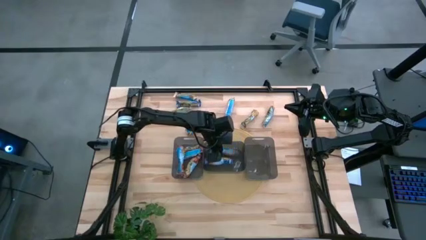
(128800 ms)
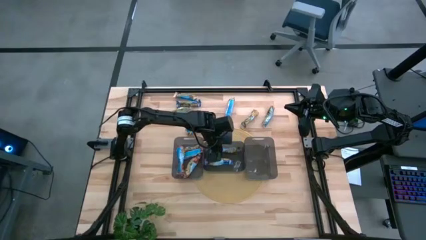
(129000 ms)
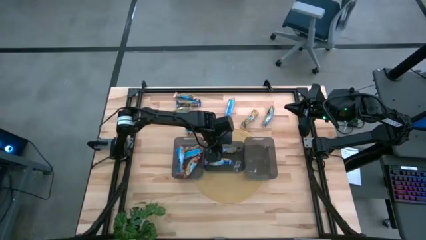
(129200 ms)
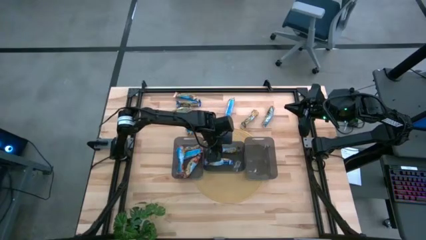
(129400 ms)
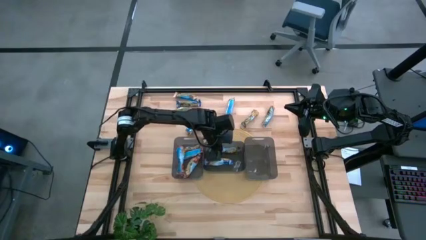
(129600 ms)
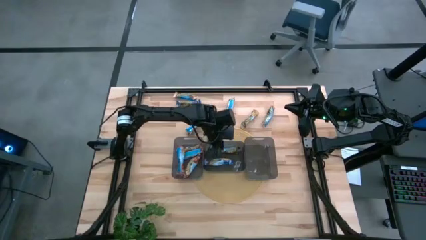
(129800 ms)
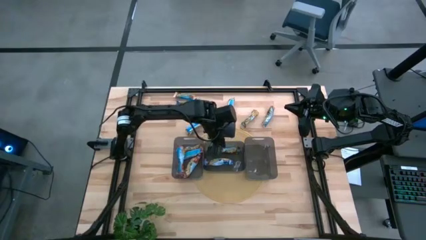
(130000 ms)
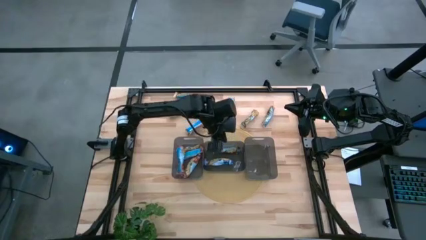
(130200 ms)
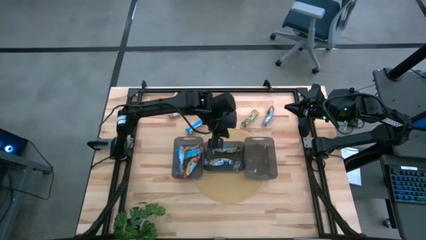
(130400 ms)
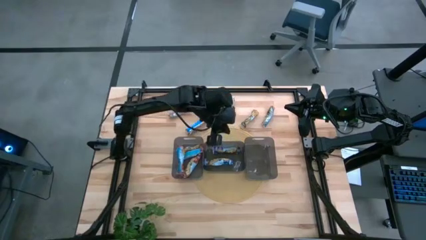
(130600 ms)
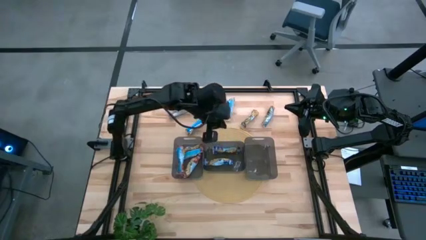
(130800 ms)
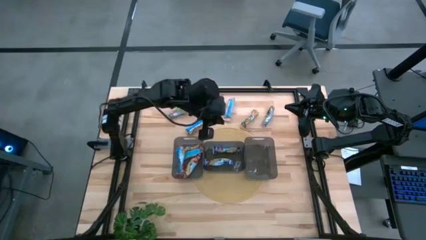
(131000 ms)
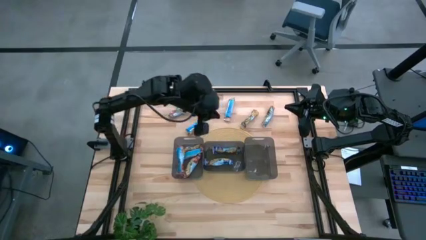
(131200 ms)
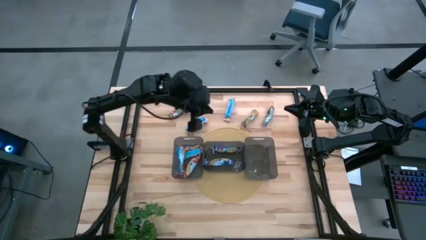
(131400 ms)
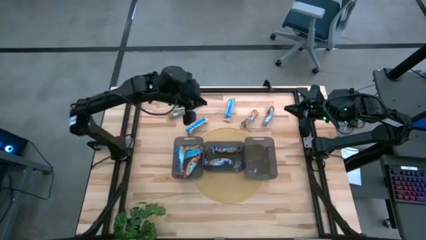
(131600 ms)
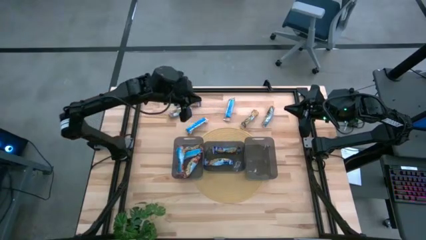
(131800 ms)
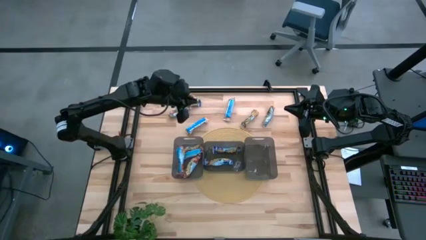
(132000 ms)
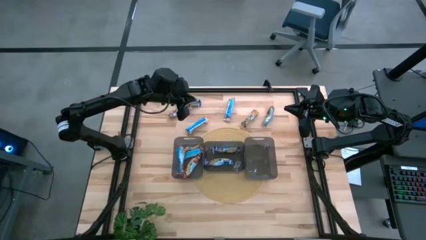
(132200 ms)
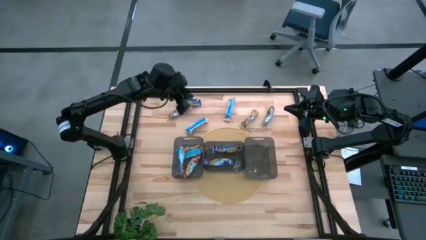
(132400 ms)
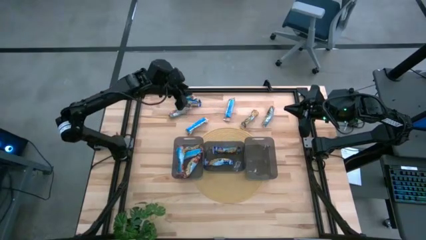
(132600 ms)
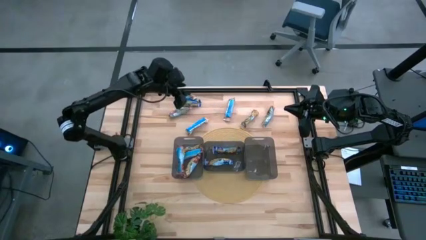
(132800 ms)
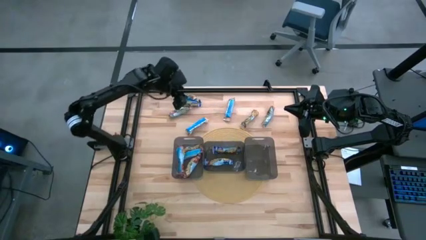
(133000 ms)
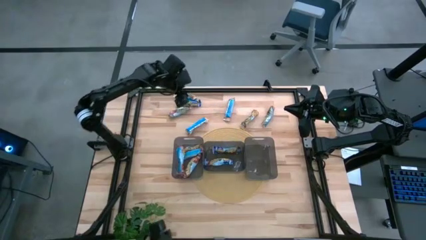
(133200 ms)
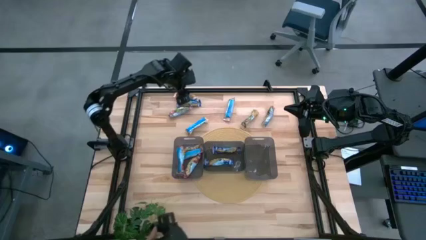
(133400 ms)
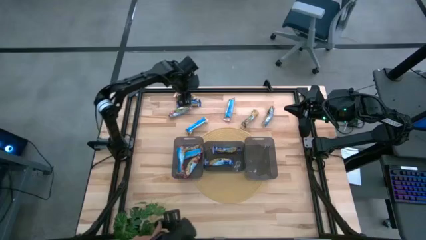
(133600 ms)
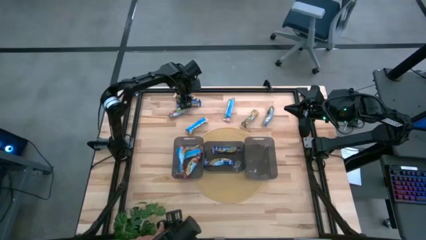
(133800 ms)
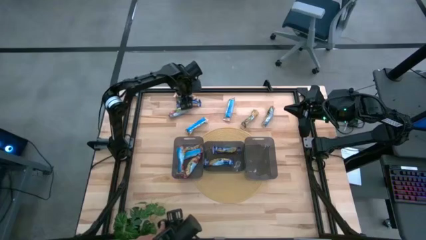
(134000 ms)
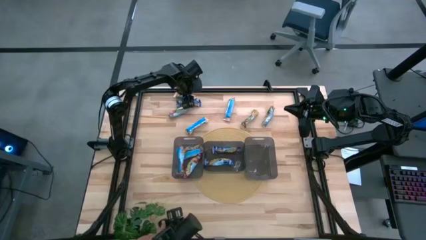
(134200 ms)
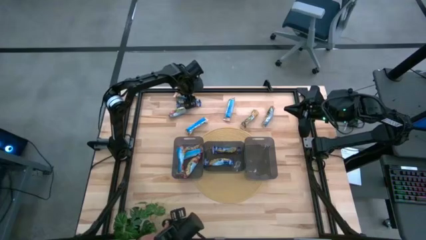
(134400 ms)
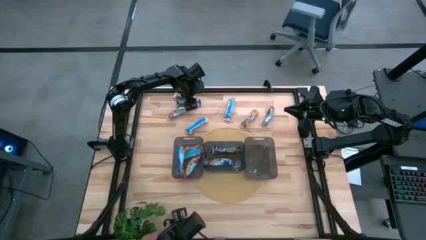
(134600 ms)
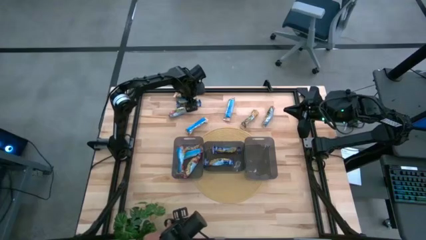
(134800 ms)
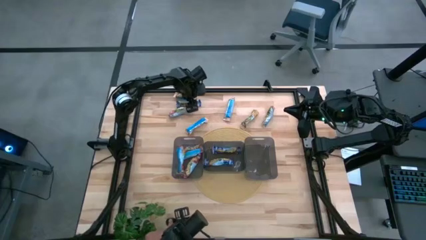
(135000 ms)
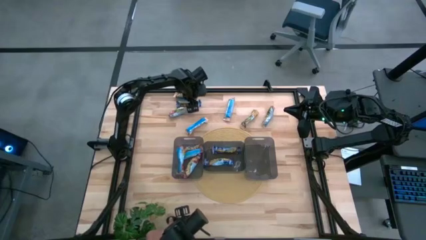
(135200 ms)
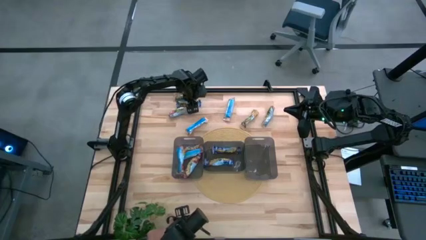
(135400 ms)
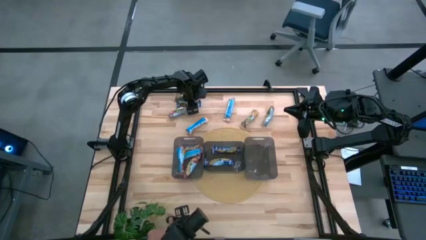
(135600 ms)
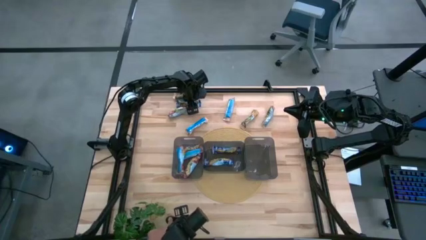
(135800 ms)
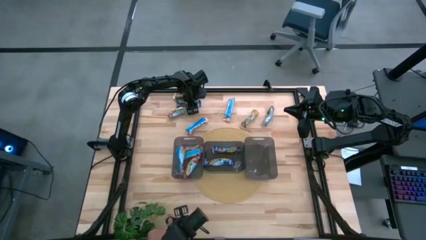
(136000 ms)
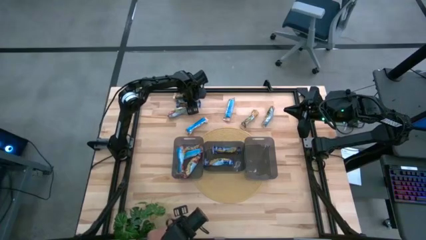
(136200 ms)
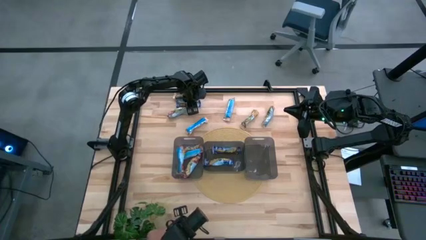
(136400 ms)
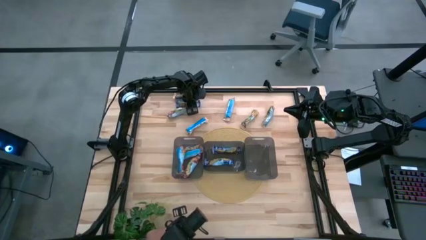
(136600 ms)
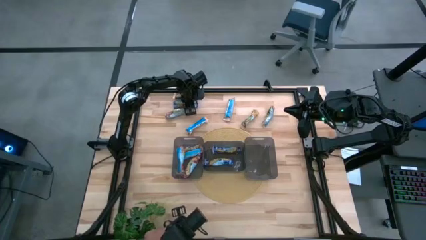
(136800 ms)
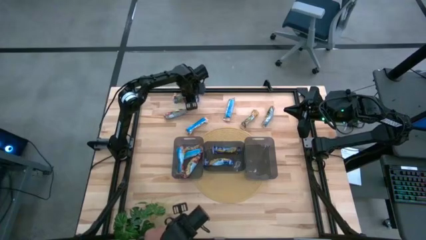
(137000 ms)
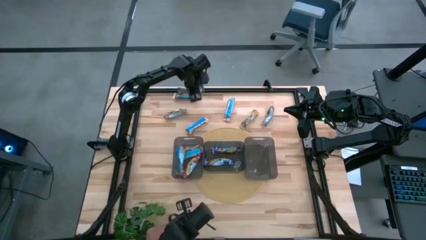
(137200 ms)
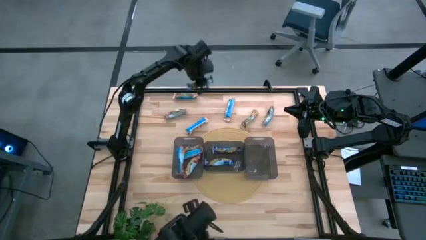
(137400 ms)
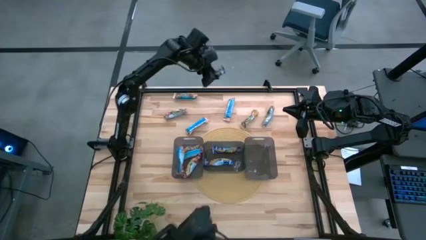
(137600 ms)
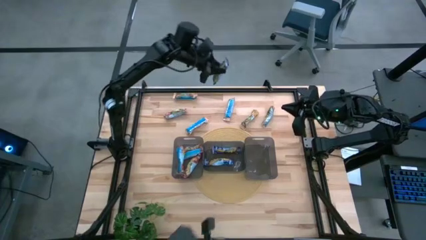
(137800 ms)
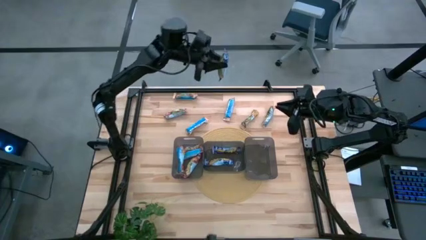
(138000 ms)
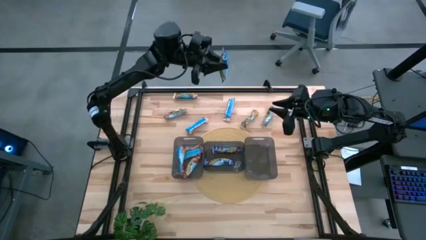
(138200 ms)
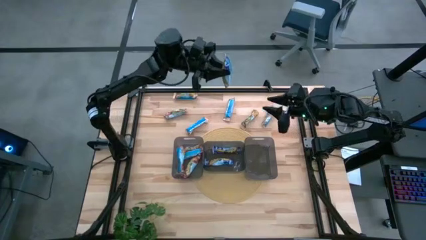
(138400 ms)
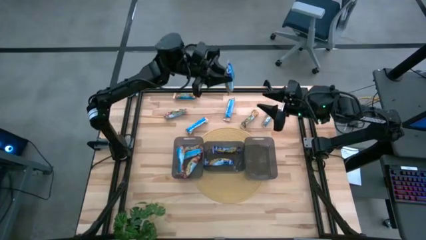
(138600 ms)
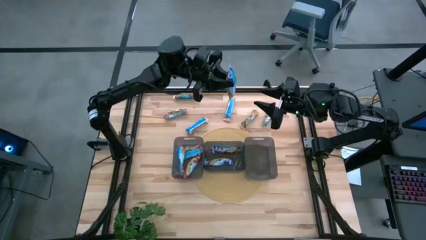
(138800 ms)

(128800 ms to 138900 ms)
Task: Pick and place Granola Bars by type
Put the blue granola bar into the center black bin

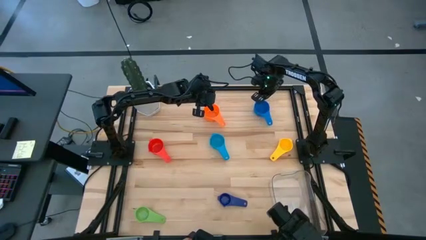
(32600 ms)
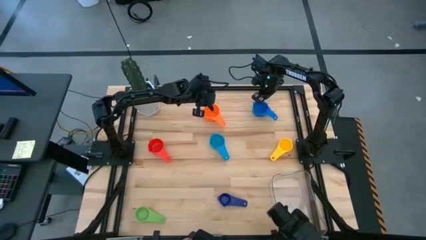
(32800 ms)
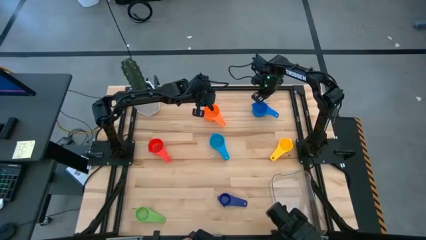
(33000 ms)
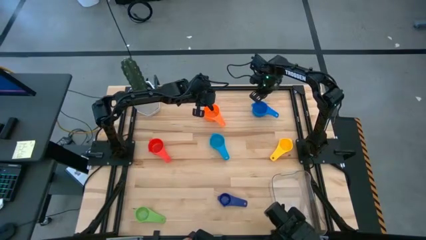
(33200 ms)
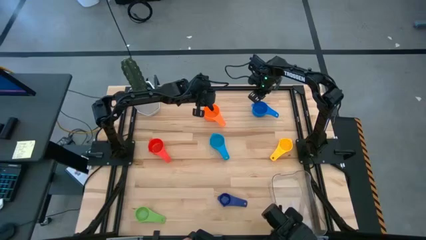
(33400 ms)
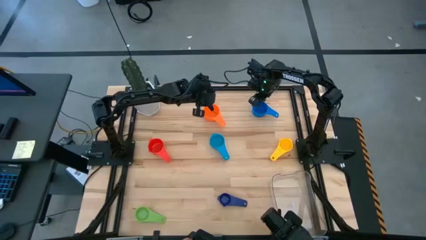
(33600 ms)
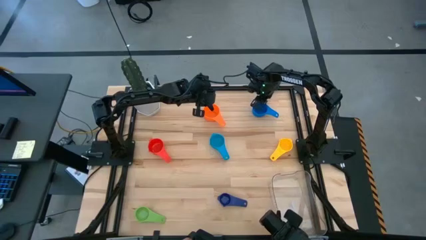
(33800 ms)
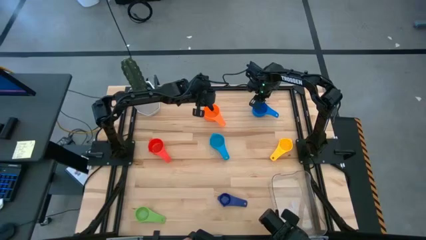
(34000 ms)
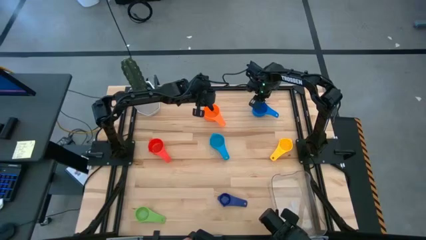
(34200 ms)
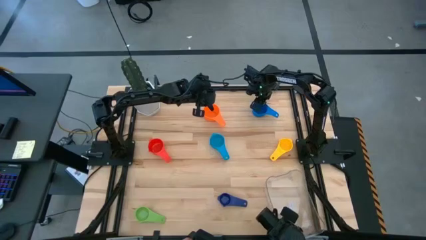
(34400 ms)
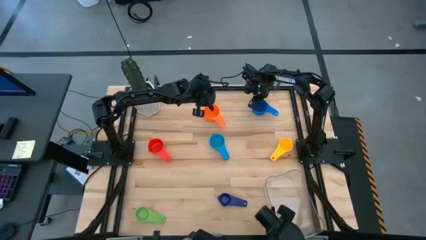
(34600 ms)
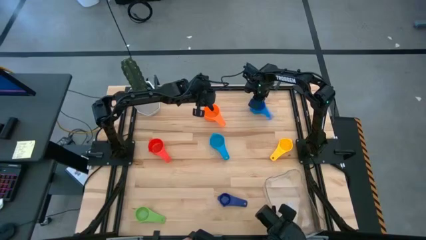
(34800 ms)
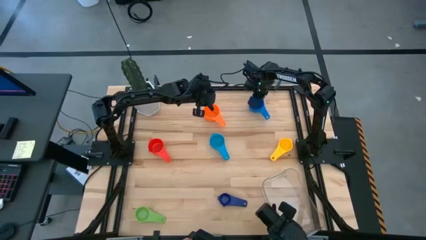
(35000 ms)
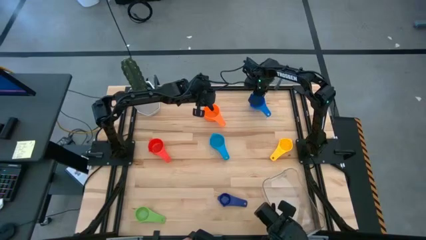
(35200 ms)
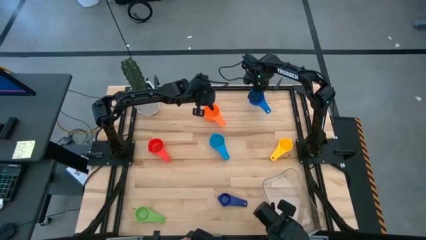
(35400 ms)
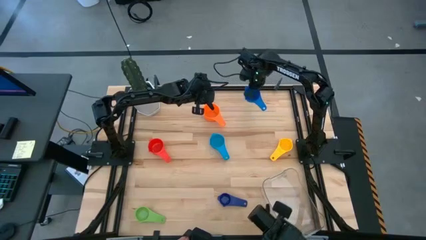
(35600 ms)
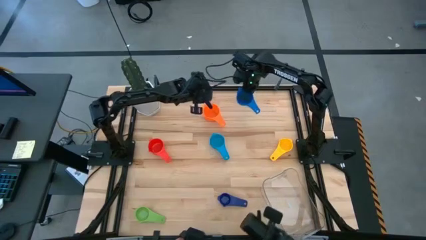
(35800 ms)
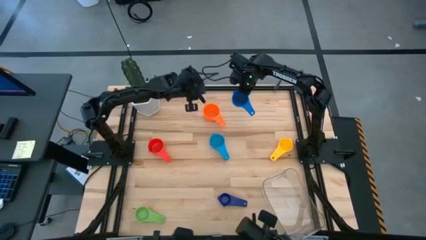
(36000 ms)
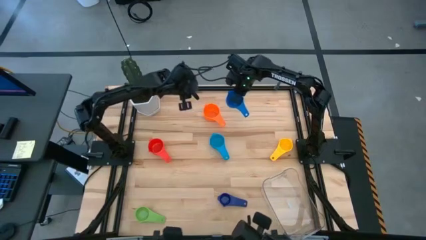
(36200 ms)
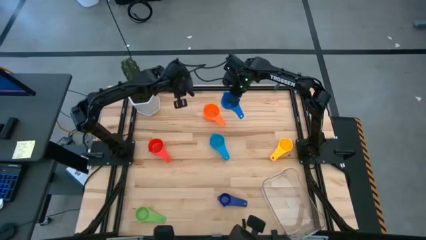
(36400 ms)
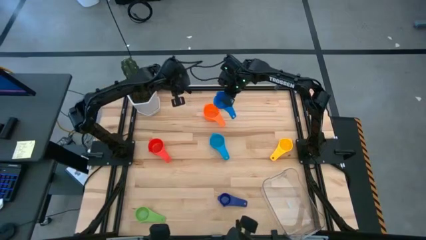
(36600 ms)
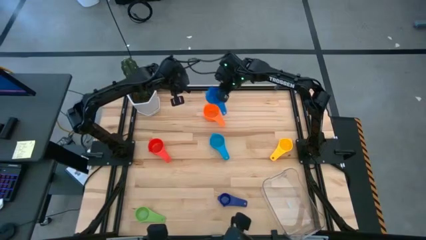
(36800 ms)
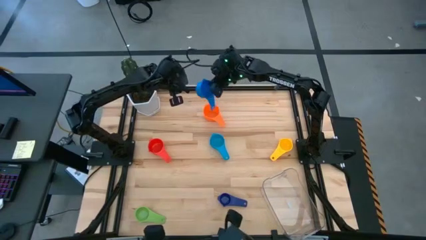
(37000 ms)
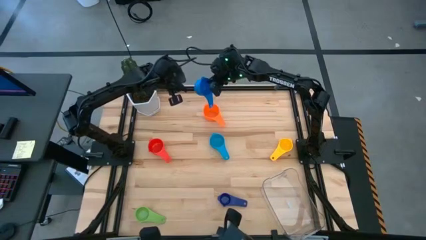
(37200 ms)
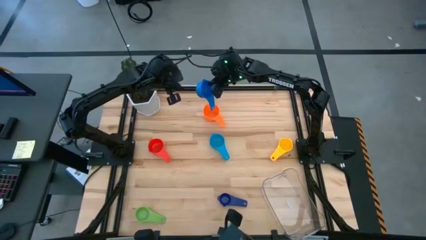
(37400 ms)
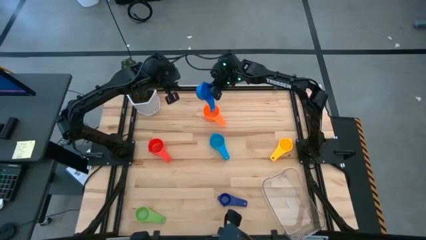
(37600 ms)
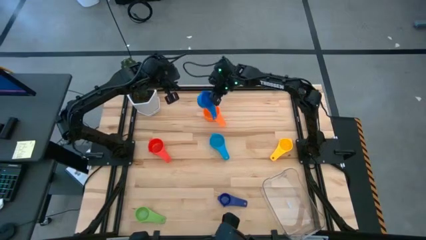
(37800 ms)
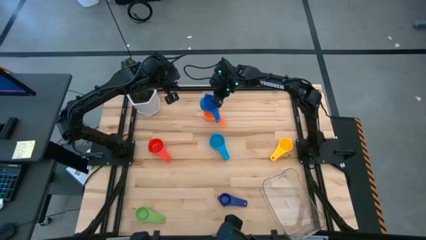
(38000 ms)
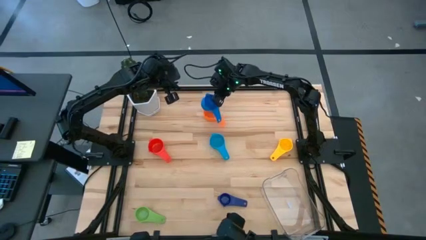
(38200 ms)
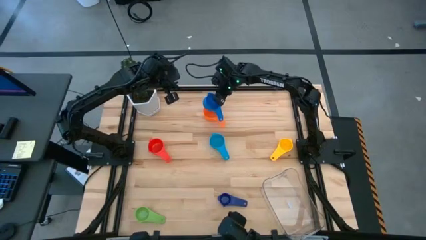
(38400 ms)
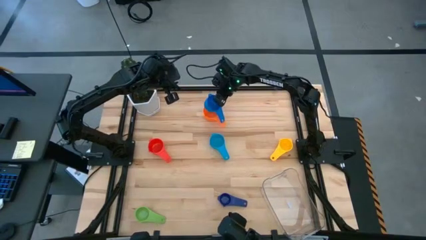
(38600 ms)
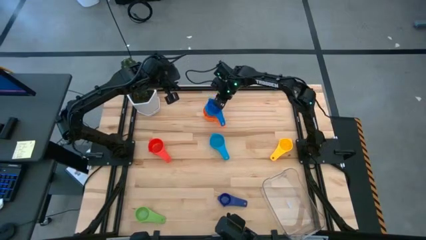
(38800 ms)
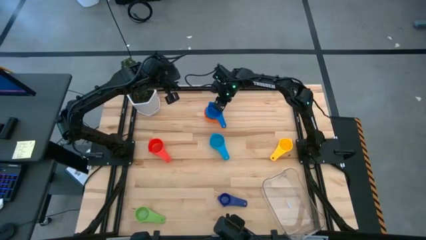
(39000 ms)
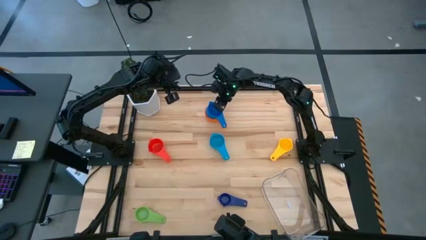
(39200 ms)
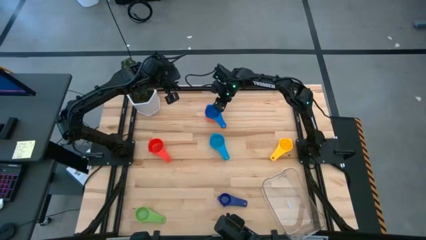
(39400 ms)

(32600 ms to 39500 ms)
Task: Nest measuring cups in basket
Stack the blue measuring cup on top of the orange measuring cup
